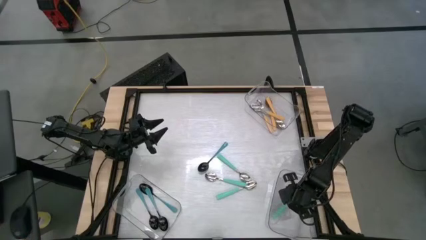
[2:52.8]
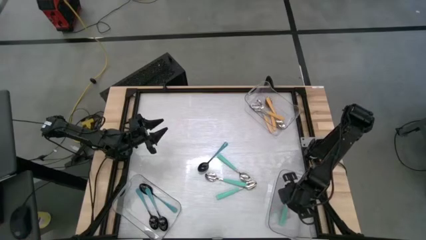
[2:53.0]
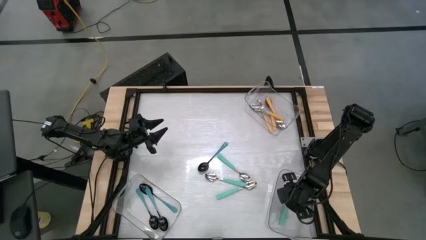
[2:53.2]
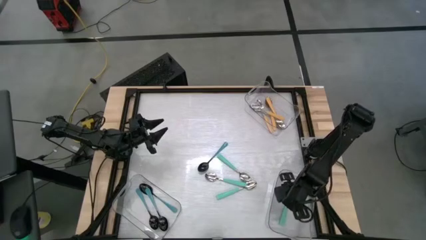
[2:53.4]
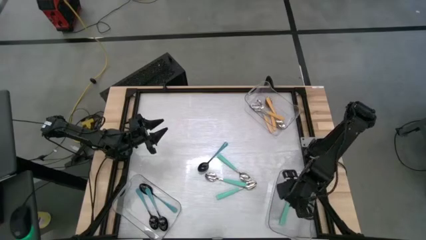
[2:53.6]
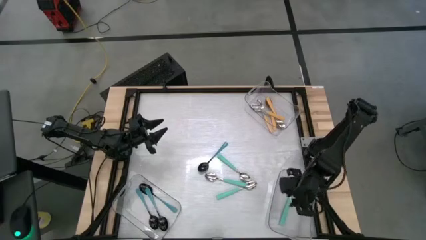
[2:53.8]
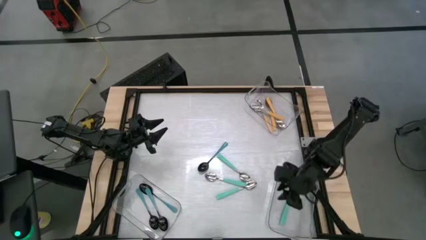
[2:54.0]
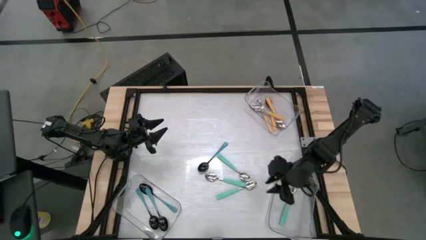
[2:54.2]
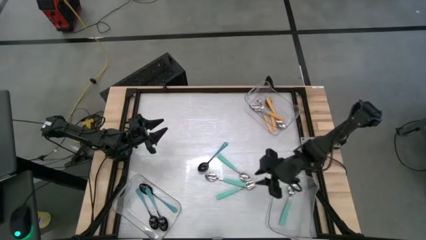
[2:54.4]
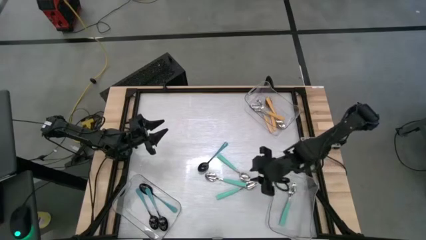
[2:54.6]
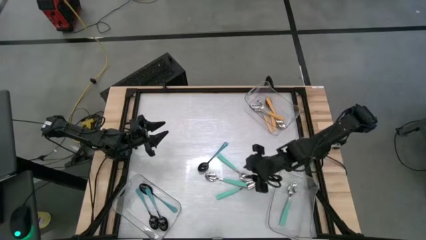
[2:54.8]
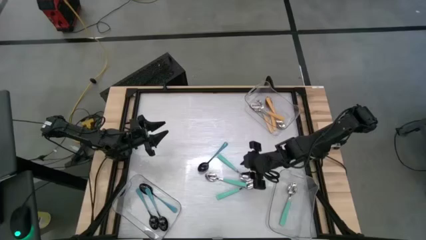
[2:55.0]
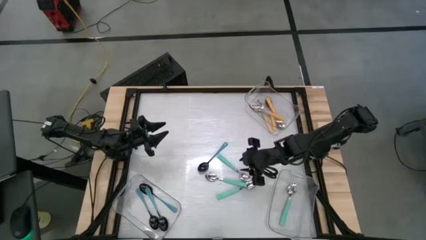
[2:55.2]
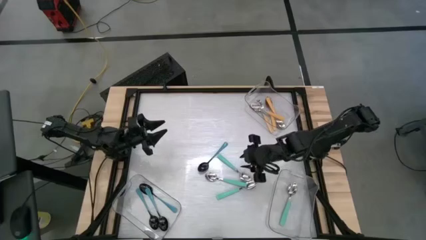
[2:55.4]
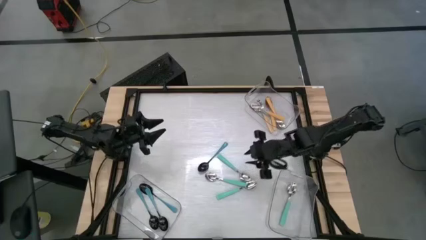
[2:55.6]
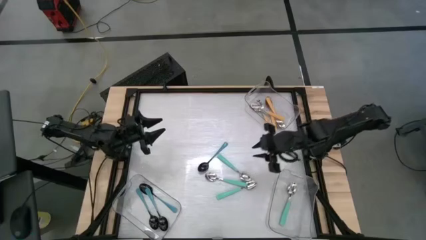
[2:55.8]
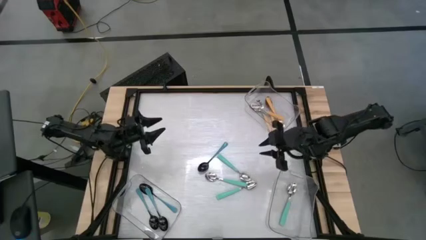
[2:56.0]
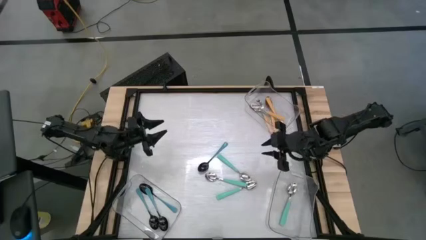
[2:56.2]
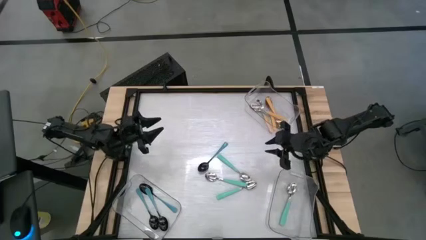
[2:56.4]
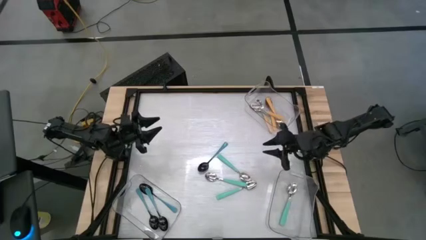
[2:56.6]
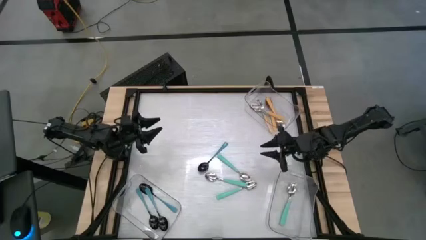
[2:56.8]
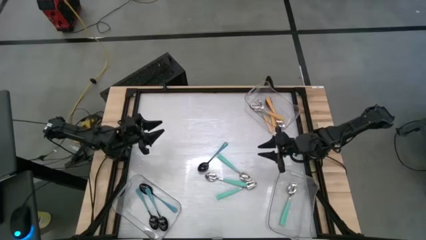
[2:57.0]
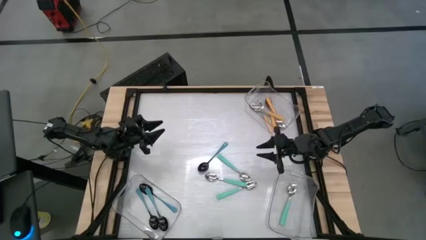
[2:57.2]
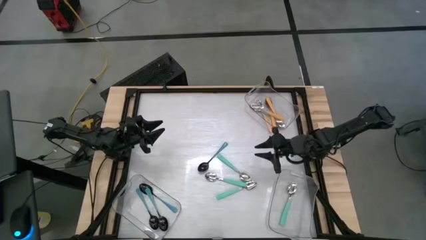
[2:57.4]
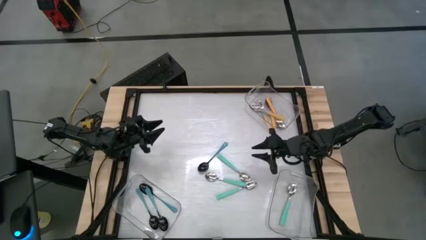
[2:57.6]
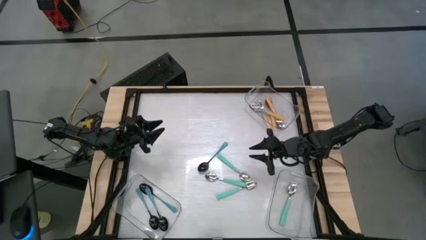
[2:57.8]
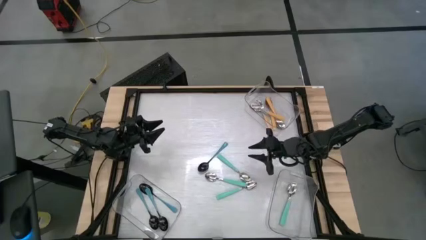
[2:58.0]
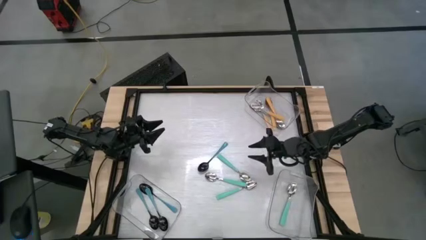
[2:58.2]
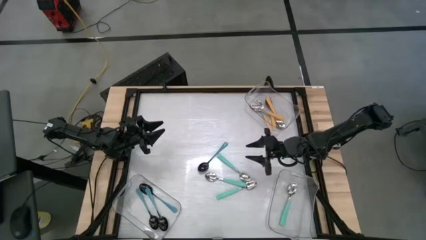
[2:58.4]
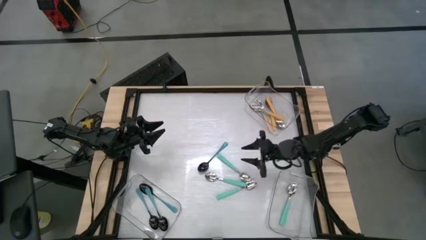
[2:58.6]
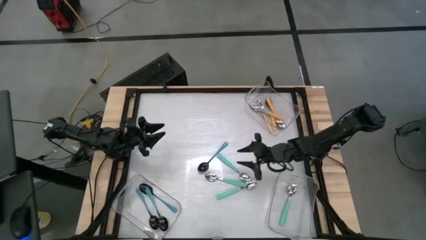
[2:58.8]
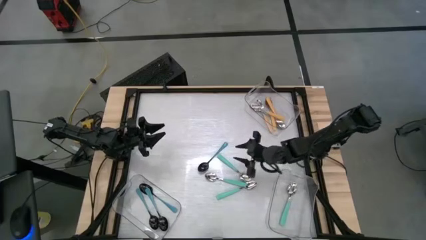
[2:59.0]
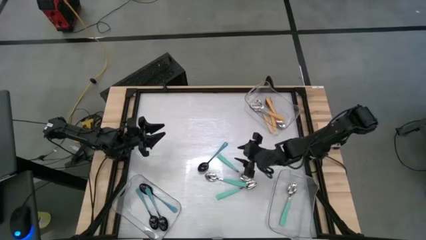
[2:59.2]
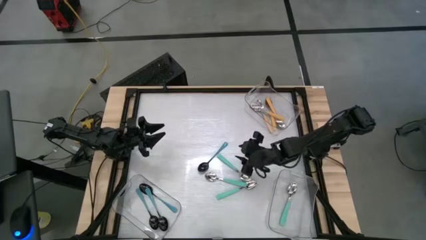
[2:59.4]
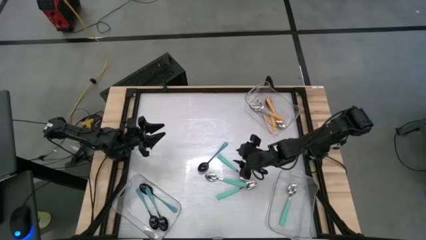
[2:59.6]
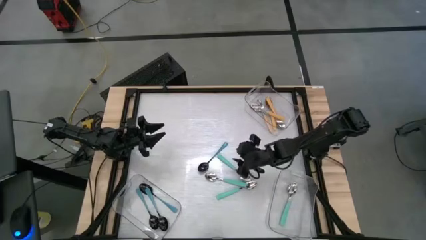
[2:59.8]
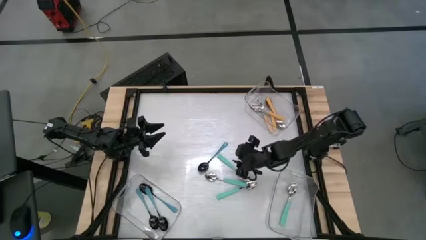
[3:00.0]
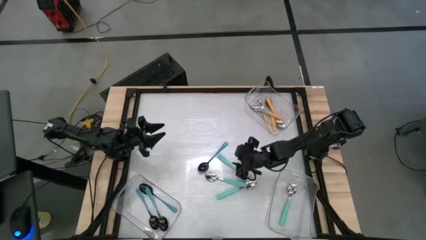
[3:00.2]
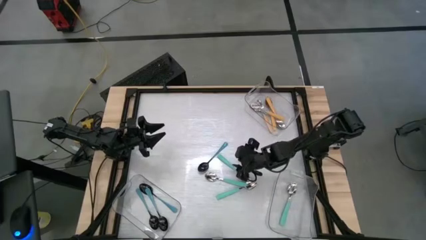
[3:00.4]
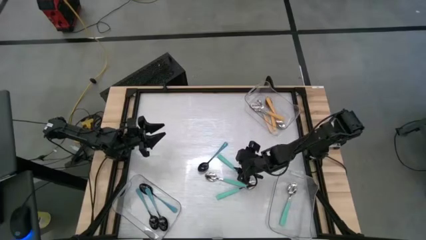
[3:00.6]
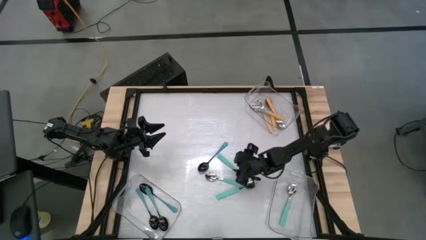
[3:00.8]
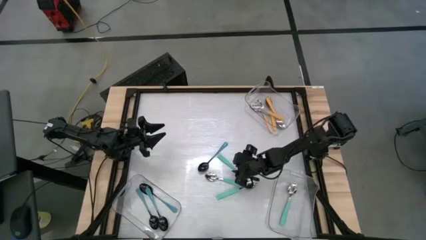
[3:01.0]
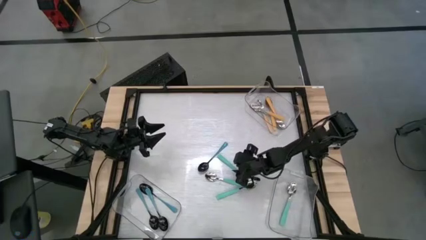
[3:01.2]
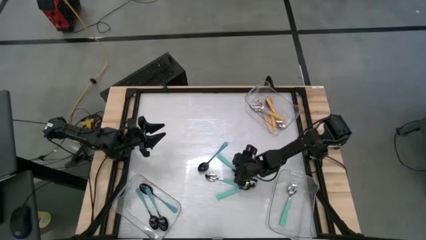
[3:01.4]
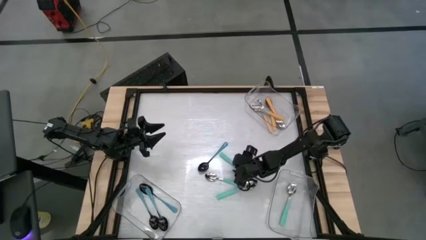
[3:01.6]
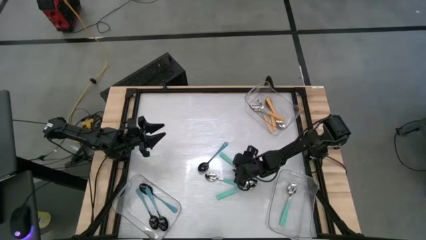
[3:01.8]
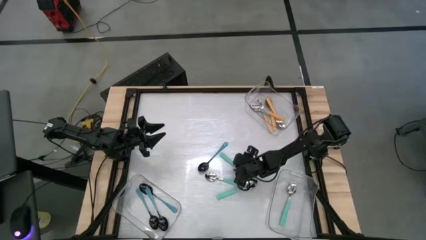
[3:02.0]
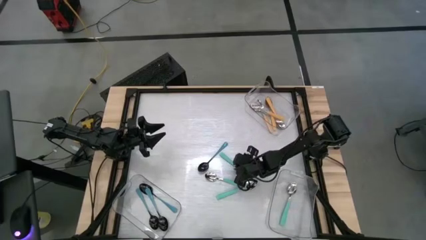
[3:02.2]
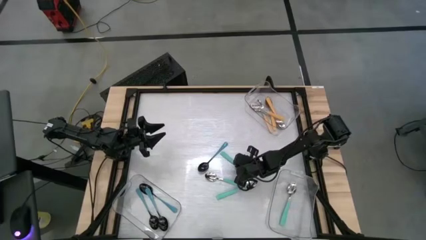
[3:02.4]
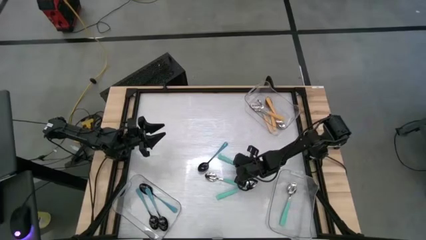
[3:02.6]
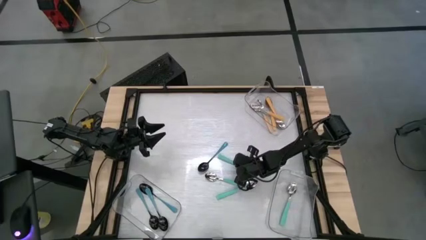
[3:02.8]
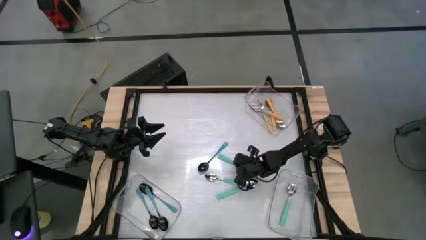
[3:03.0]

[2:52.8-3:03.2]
Task: Sort silverware by color (type)
Put the green spoon into the bottom right transparent bin

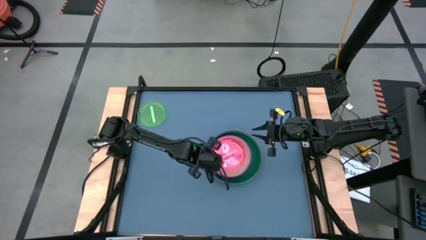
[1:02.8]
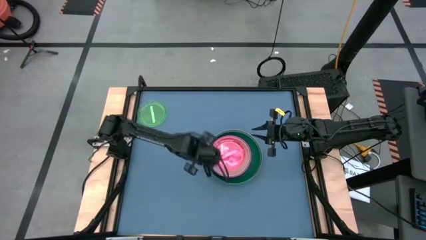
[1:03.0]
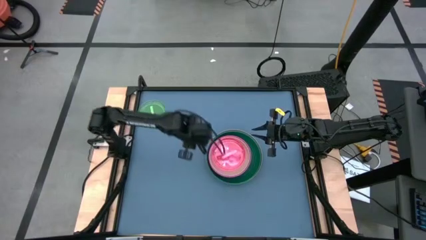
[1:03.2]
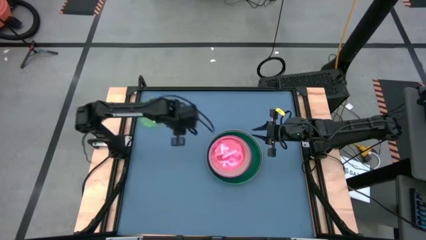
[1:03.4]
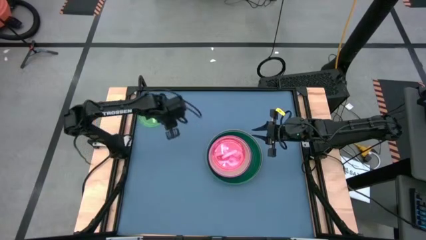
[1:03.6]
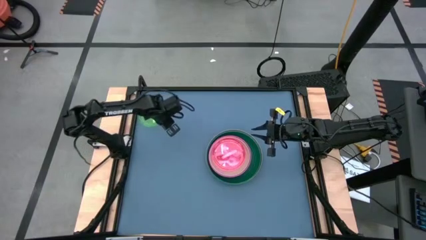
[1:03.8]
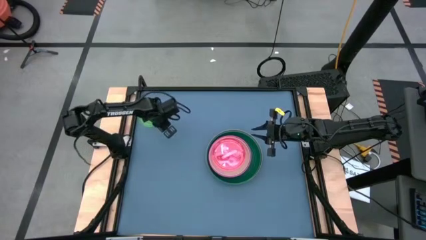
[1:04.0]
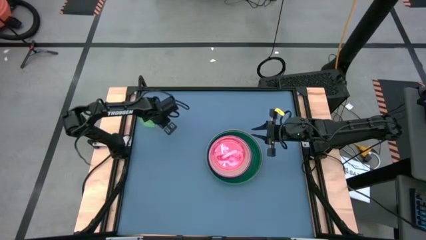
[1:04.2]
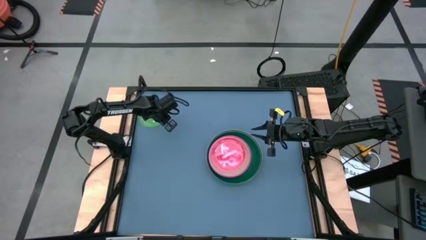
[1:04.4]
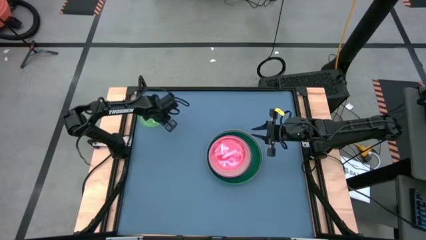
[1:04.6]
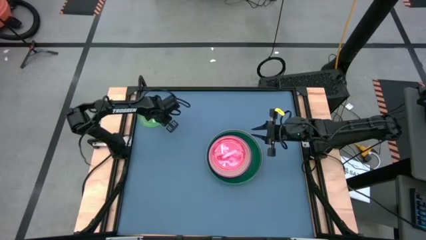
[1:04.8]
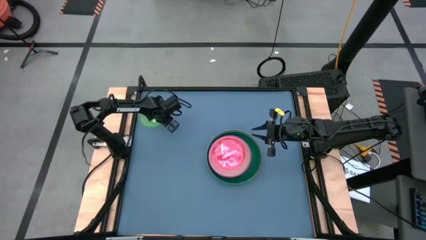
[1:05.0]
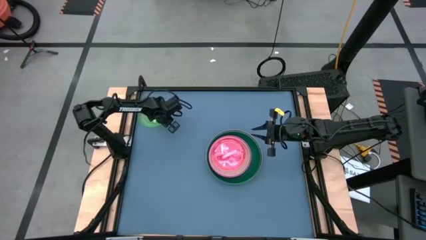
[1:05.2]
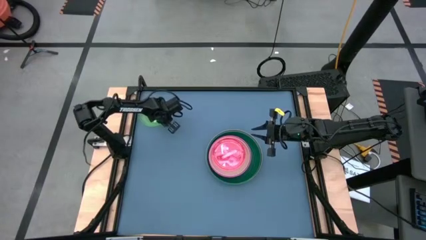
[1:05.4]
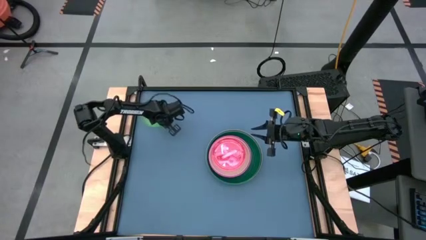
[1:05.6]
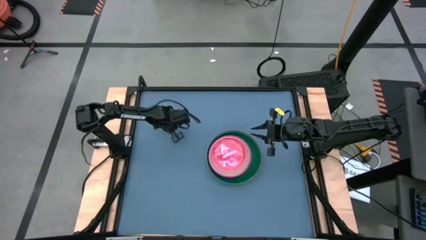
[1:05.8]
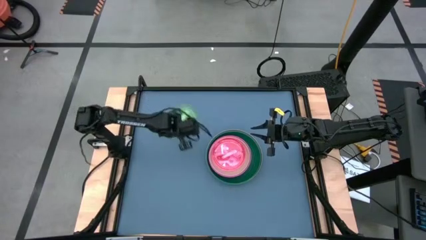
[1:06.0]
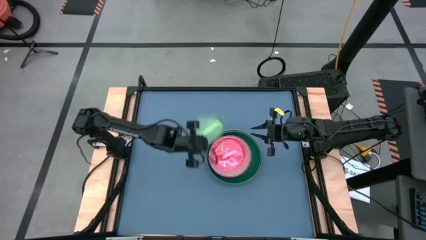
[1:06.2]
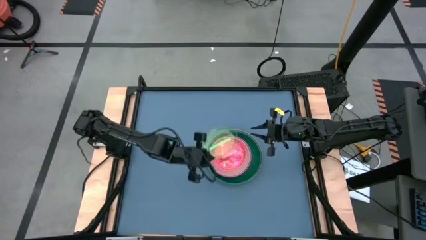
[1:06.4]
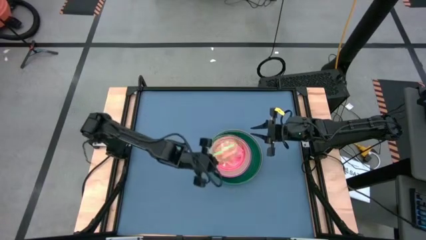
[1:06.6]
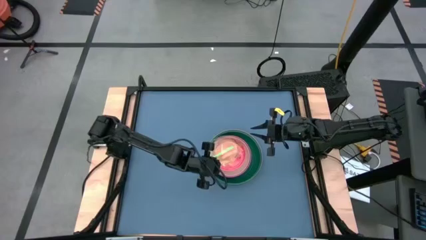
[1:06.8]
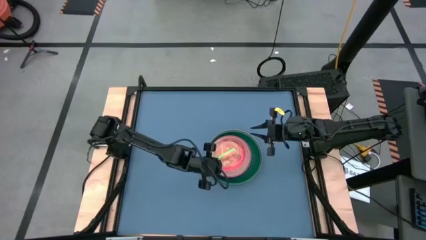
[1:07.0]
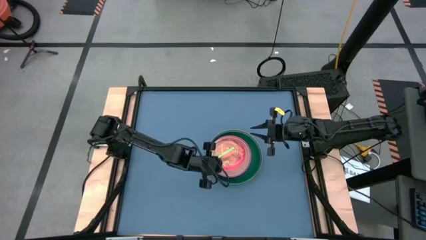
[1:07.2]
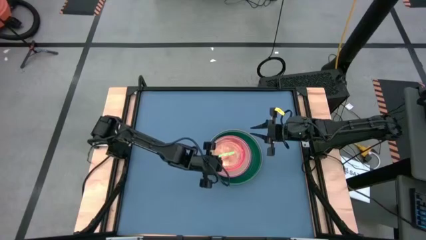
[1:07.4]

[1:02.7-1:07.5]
Task: Stack plastic plates
Stack the light green plate on top of the light pink plate
